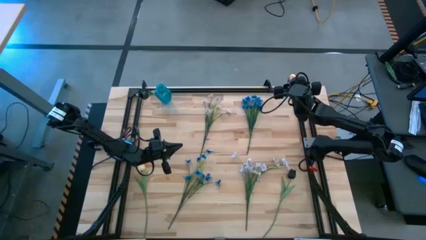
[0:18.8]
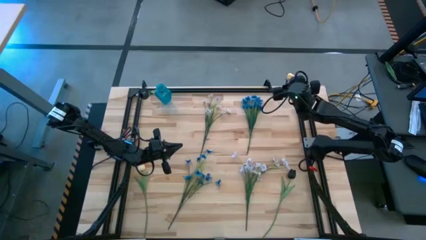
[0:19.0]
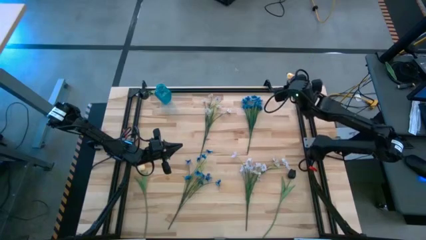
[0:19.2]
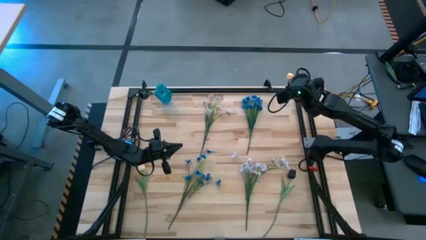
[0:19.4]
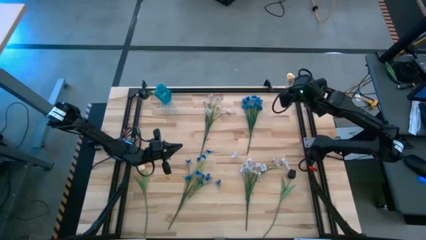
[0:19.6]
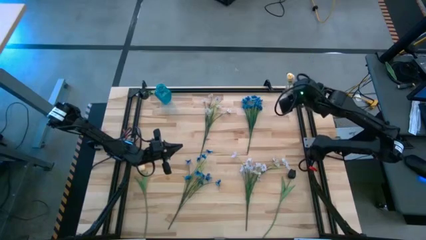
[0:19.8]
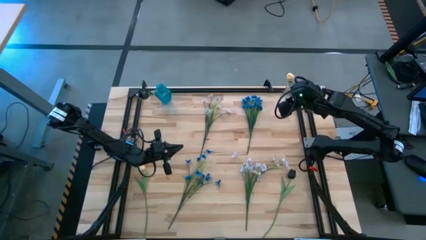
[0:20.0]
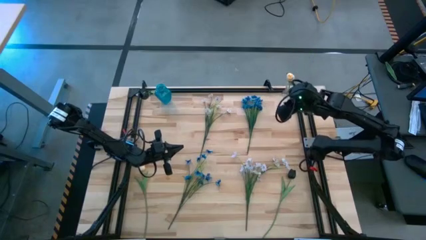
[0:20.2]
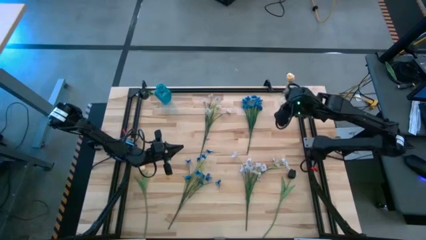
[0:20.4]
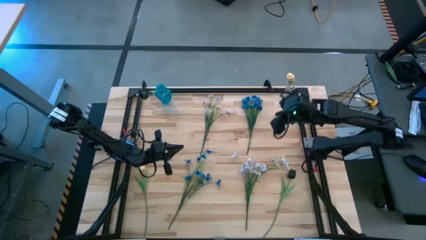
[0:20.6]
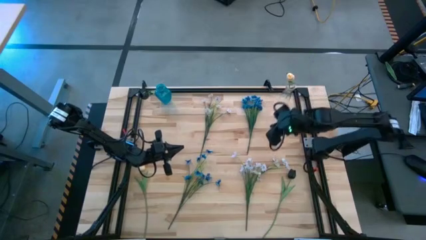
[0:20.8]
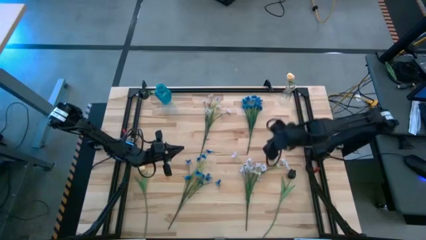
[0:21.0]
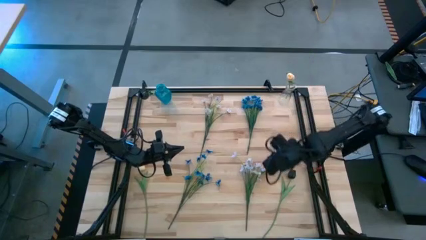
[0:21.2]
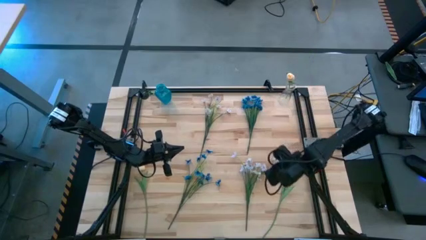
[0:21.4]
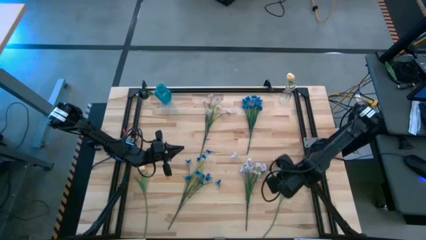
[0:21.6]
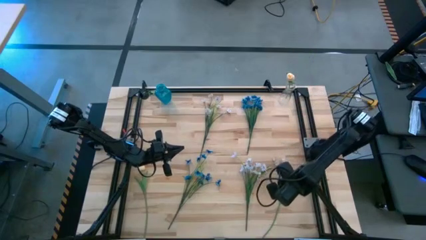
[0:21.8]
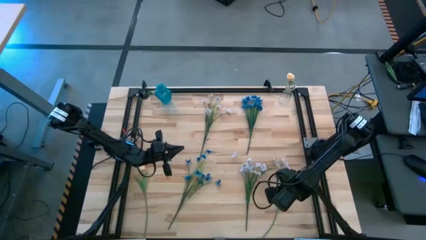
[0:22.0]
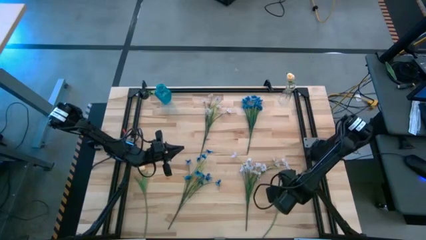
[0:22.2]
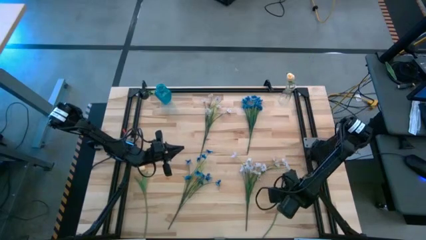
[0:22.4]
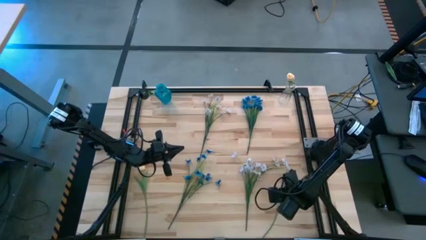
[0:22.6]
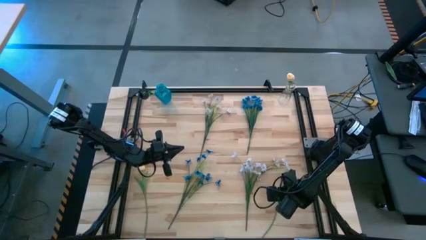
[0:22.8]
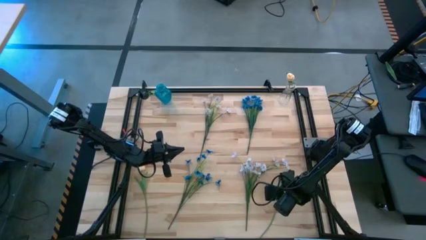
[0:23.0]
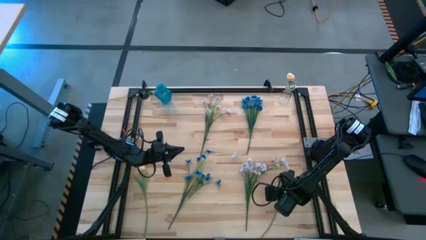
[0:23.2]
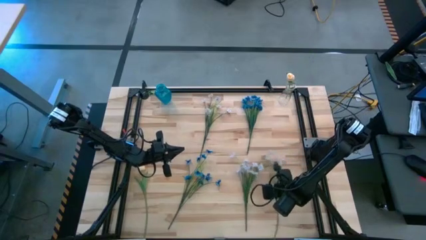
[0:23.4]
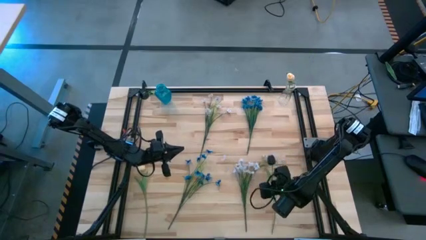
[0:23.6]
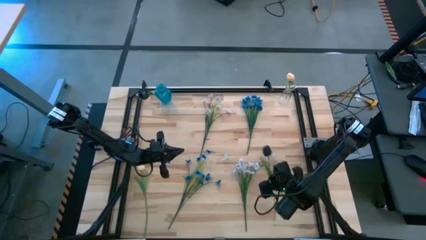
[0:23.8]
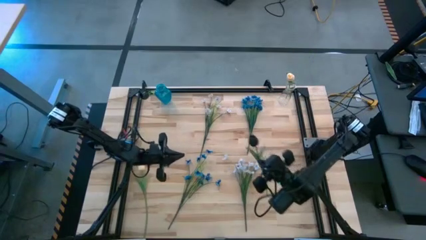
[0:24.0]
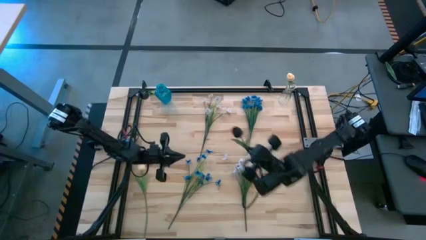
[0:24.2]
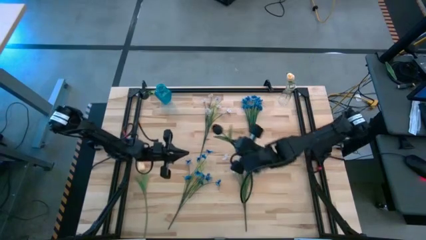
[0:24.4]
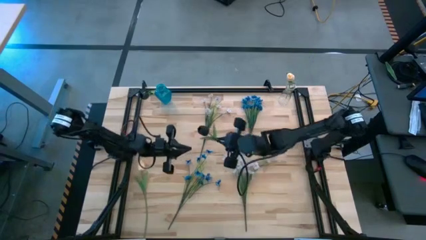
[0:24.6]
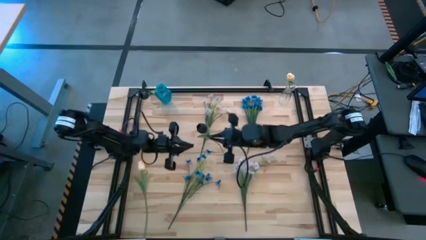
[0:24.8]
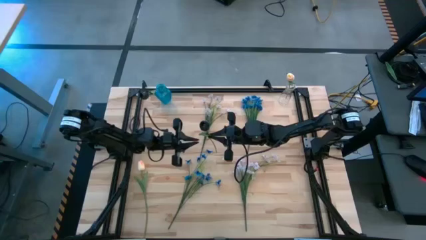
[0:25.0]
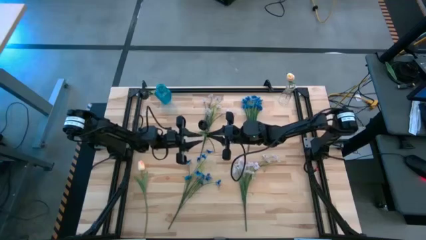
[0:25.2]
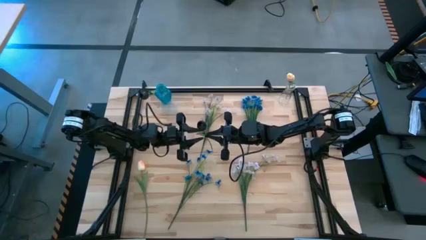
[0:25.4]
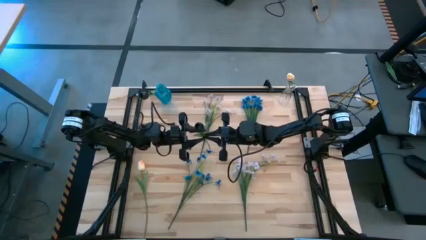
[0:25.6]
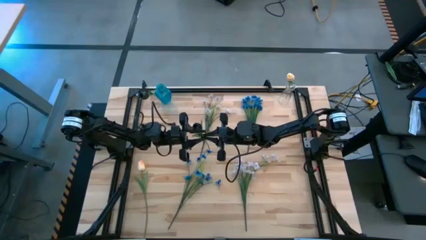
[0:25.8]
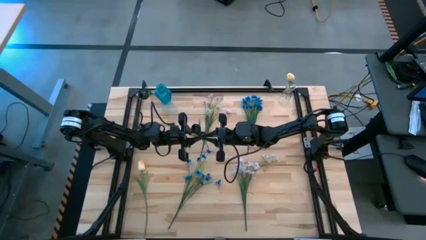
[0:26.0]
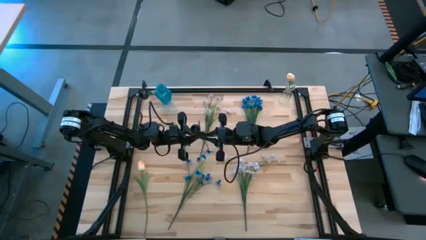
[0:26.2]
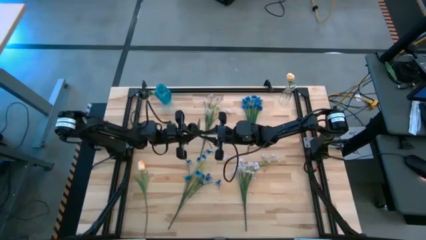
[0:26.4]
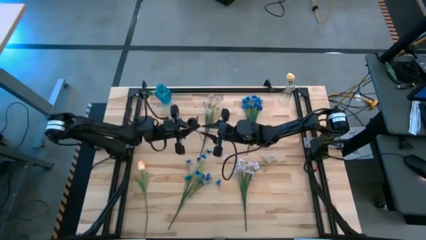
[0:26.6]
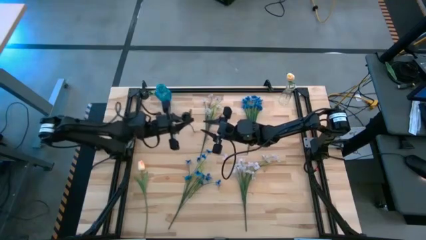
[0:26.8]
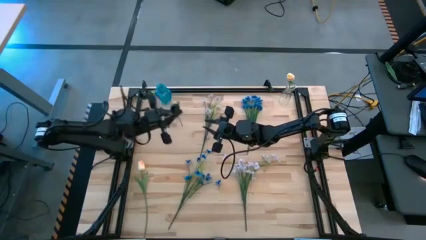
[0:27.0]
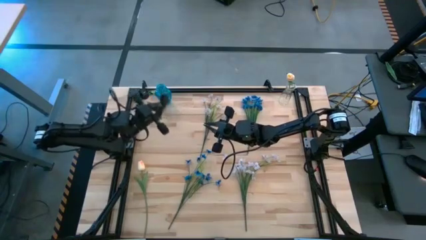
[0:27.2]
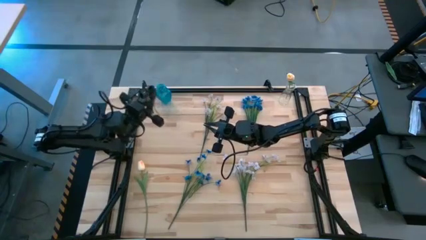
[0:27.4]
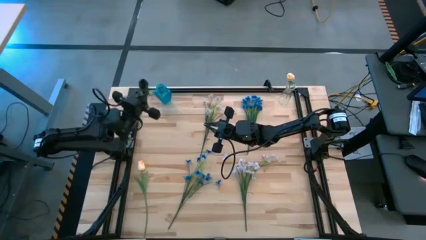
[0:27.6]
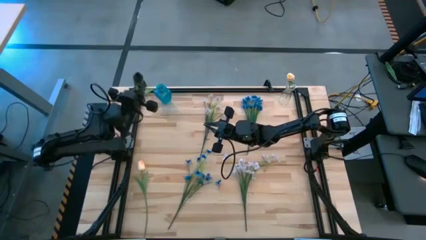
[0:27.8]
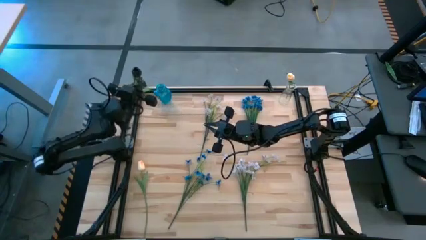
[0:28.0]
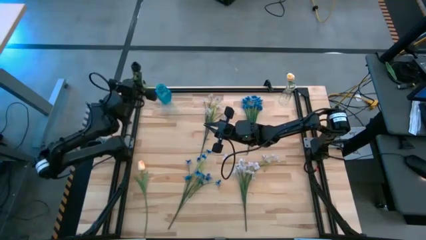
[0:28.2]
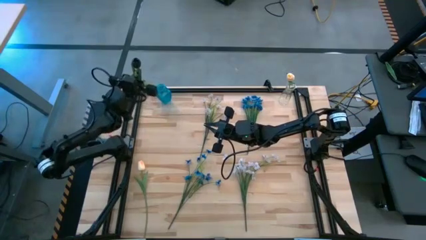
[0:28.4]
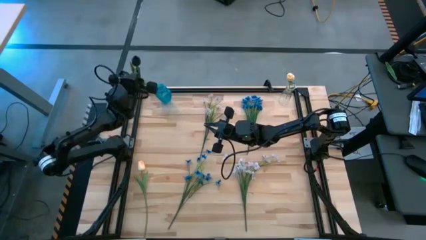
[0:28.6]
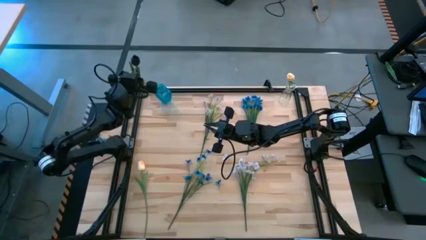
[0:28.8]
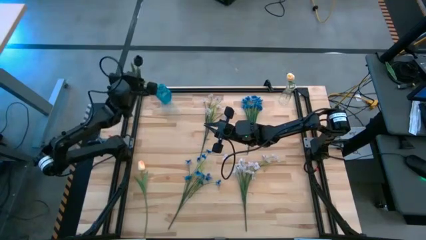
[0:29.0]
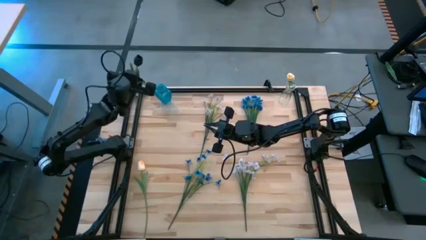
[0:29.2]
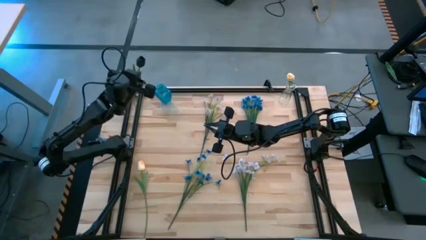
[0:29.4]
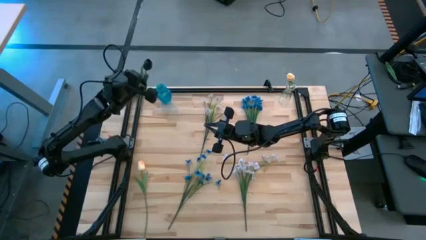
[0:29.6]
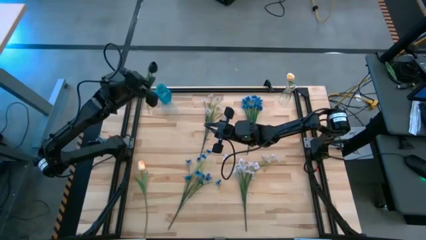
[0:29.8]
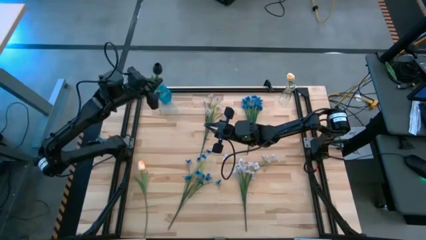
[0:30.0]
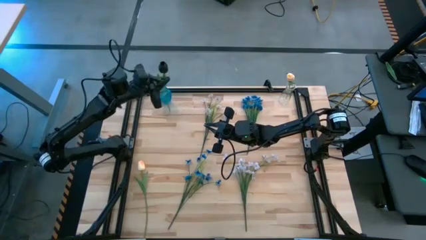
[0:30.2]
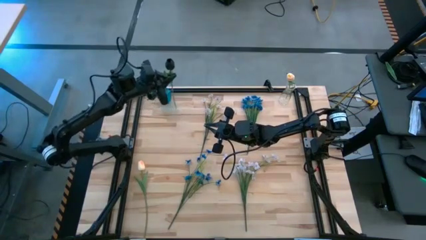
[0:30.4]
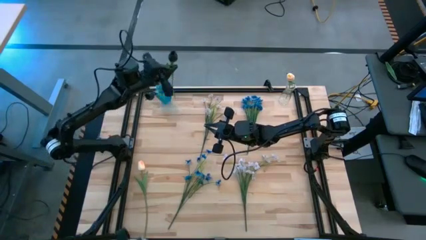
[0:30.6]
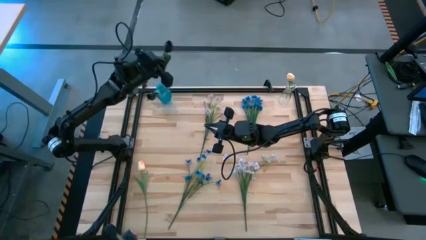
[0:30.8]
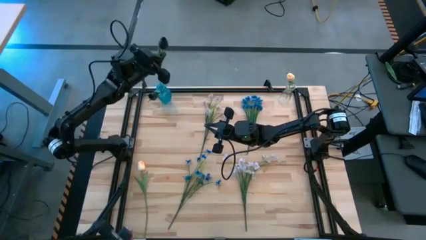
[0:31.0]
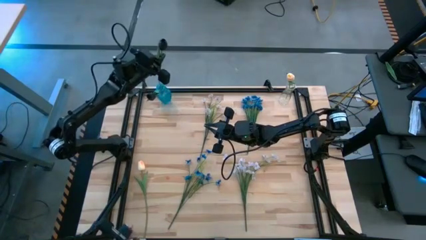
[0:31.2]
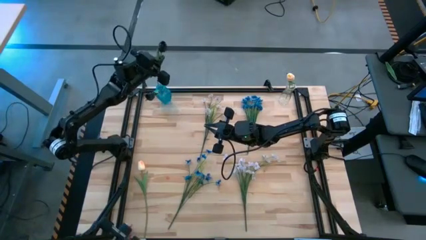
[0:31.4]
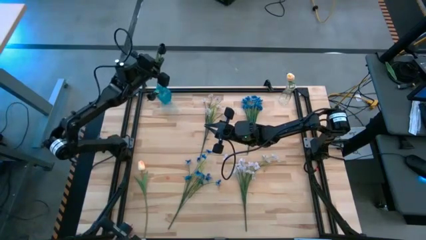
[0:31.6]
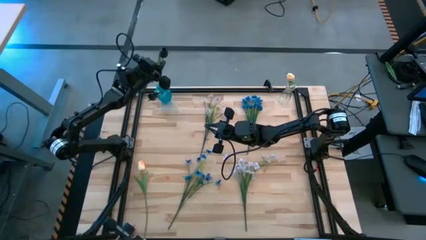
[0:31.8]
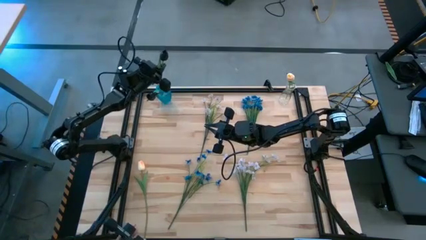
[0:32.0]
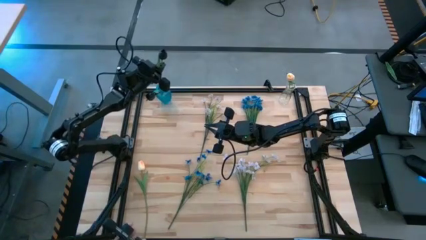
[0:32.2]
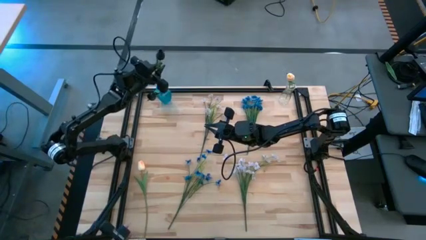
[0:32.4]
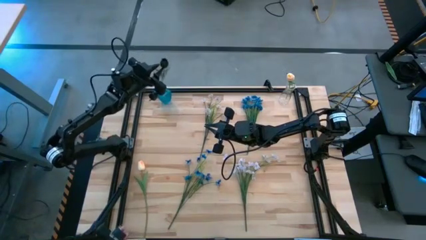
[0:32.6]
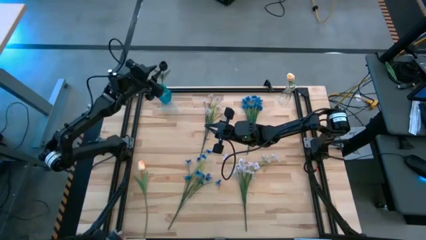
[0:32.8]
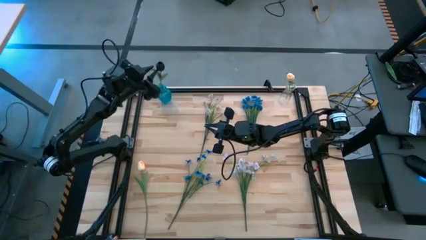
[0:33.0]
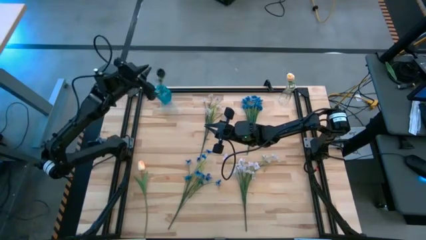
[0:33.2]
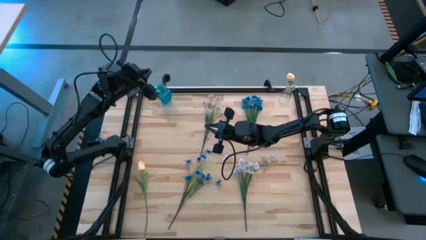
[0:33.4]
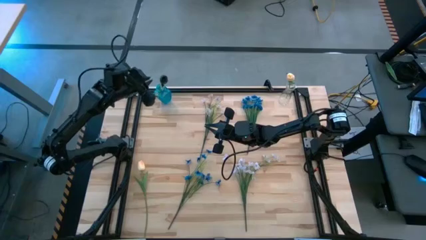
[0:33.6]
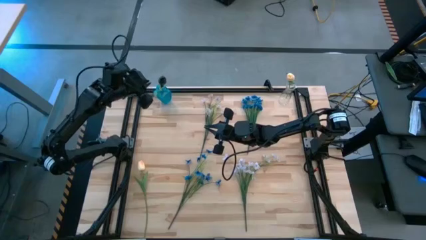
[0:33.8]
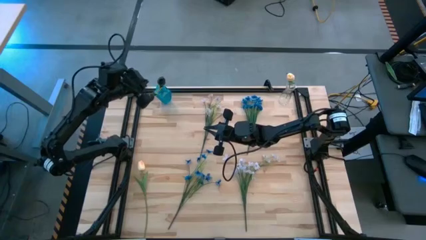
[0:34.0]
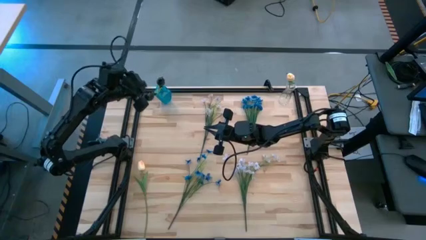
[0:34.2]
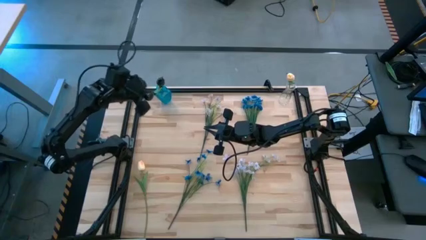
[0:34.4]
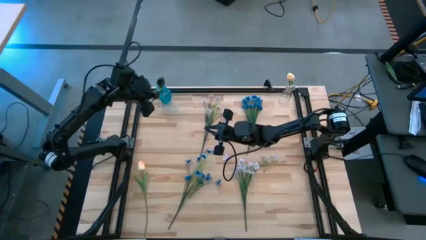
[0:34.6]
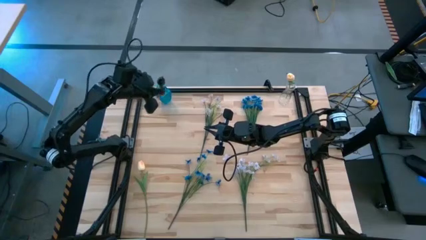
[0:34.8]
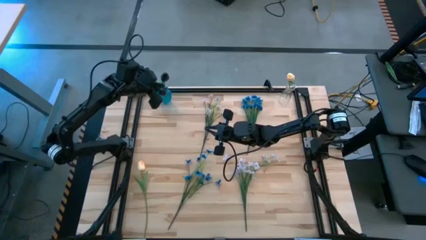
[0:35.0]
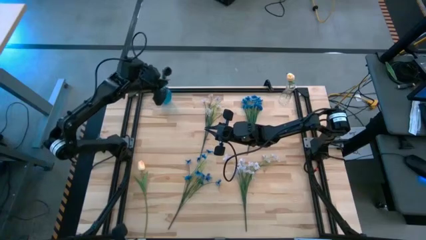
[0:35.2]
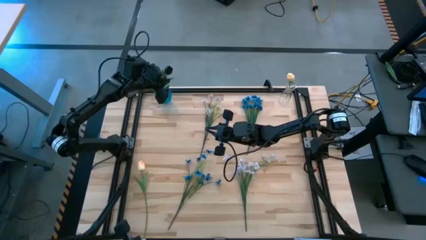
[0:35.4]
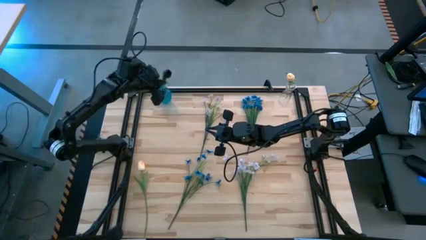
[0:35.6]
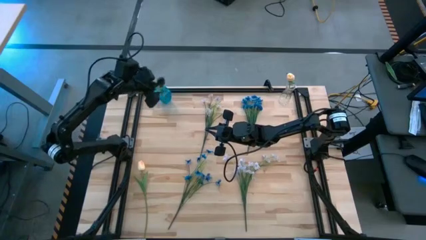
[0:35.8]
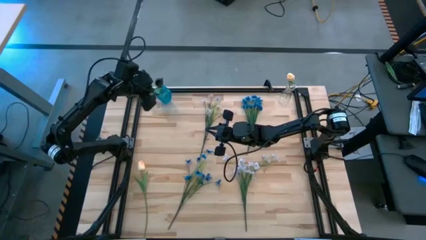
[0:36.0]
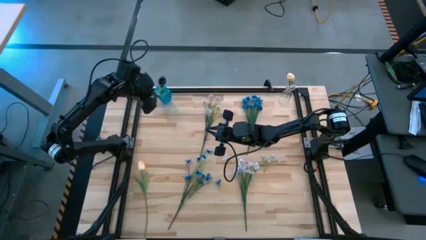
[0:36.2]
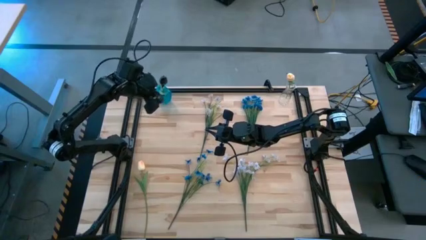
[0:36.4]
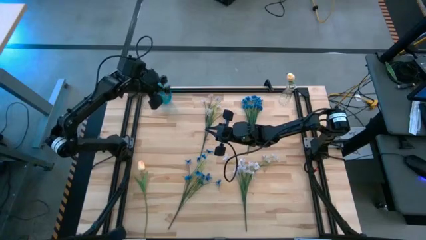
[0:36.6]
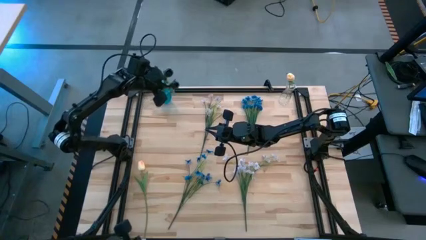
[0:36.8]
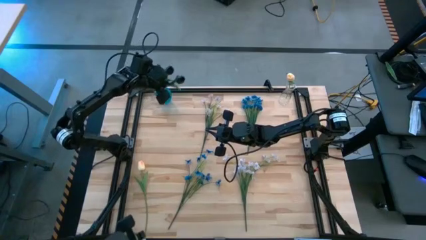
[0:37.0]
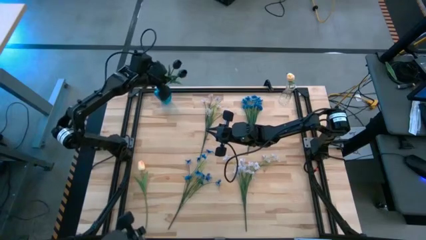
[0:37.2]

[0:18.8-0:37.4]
Task: Sort flowers into vase by color
Put the black tulip into the blue vase
